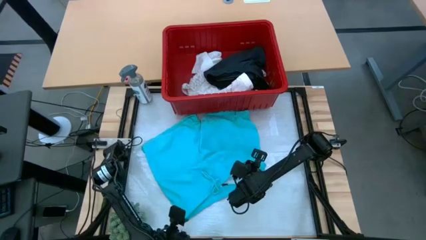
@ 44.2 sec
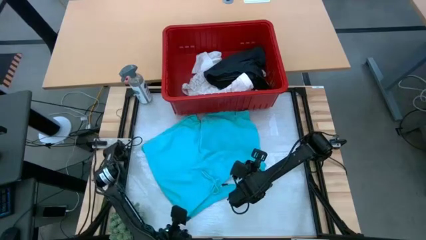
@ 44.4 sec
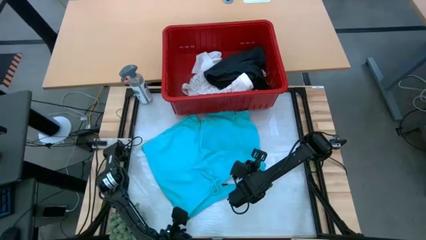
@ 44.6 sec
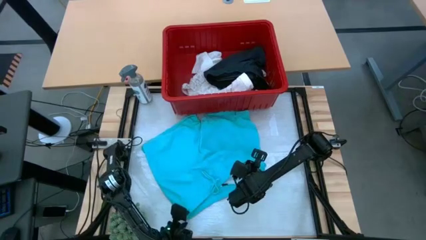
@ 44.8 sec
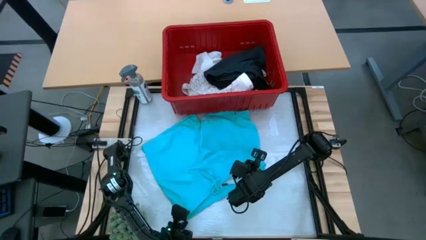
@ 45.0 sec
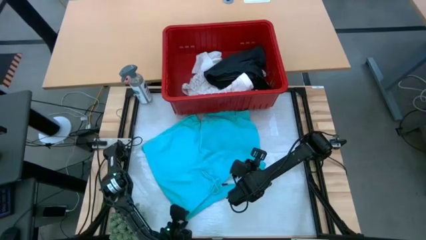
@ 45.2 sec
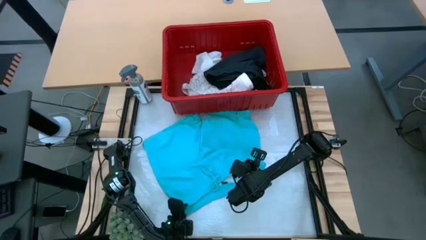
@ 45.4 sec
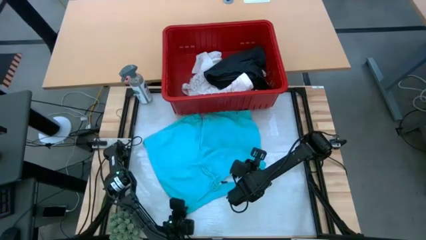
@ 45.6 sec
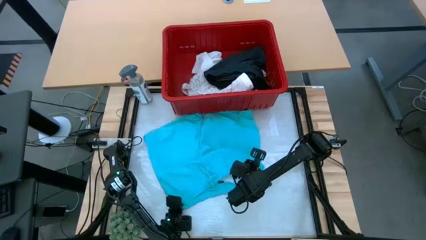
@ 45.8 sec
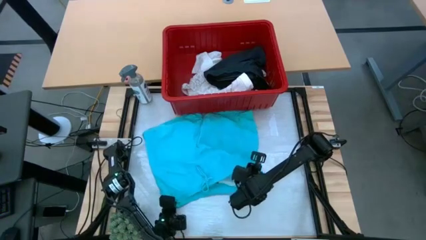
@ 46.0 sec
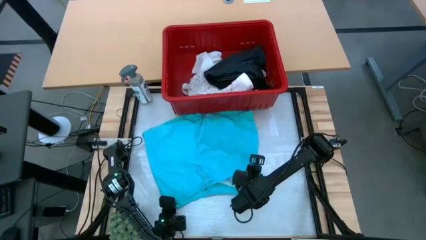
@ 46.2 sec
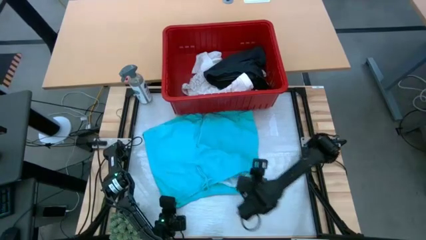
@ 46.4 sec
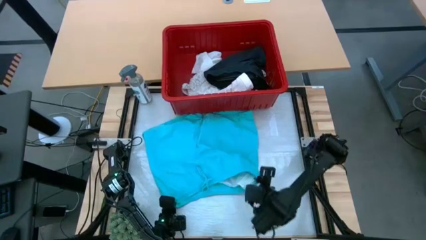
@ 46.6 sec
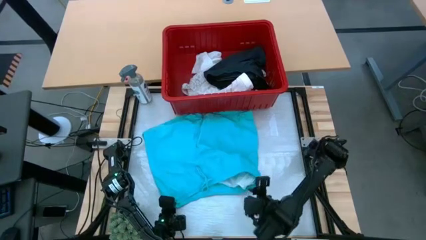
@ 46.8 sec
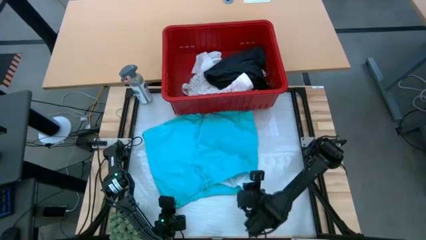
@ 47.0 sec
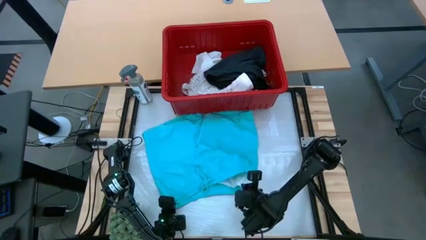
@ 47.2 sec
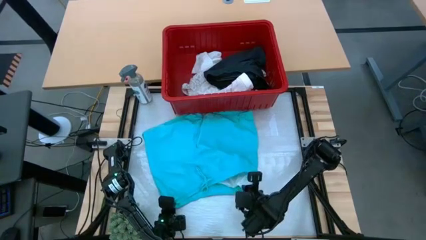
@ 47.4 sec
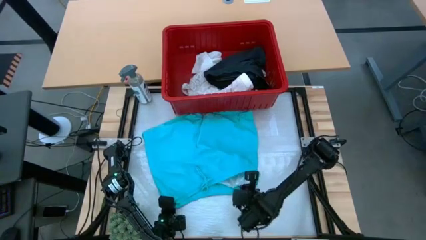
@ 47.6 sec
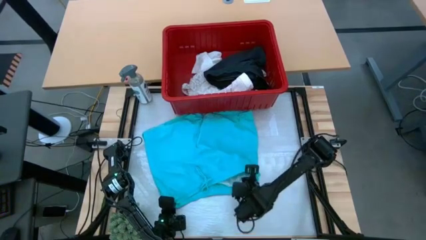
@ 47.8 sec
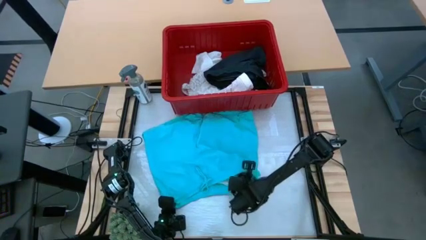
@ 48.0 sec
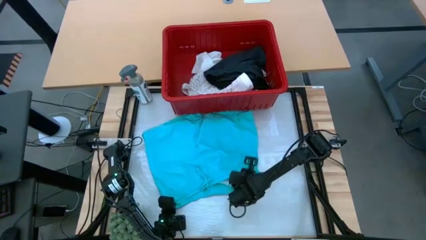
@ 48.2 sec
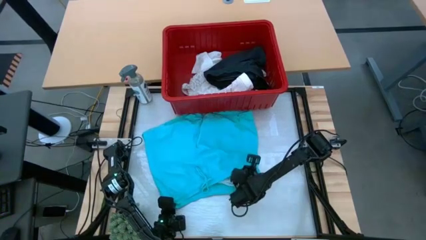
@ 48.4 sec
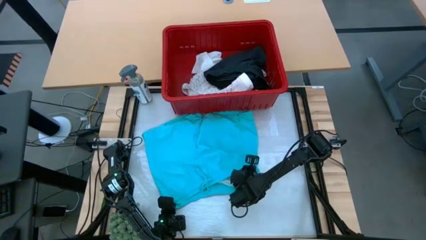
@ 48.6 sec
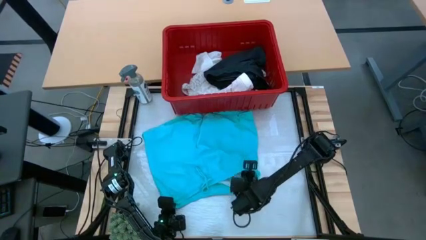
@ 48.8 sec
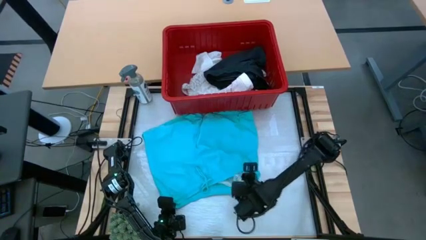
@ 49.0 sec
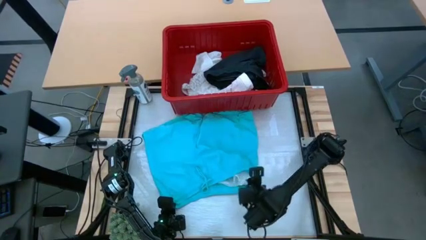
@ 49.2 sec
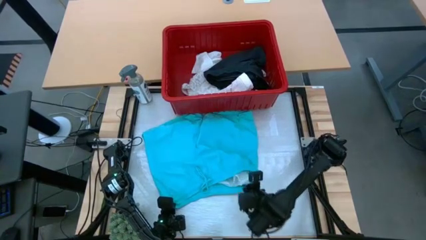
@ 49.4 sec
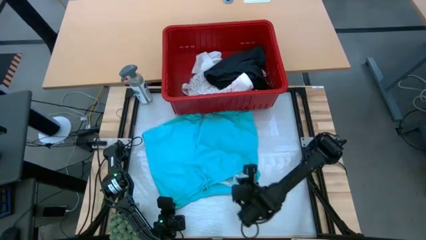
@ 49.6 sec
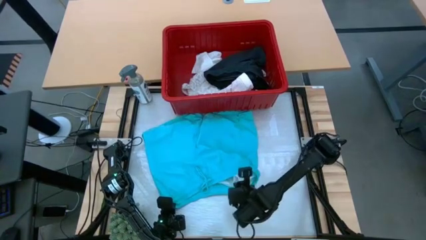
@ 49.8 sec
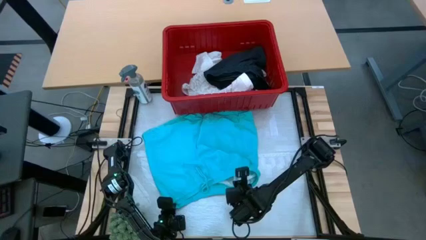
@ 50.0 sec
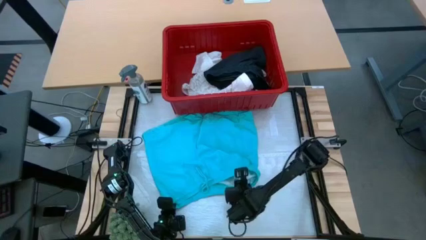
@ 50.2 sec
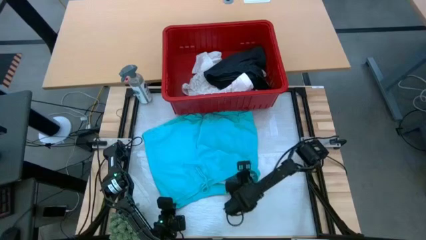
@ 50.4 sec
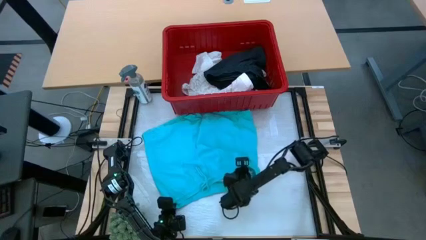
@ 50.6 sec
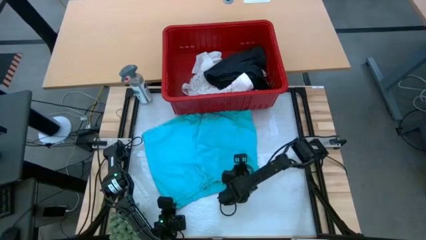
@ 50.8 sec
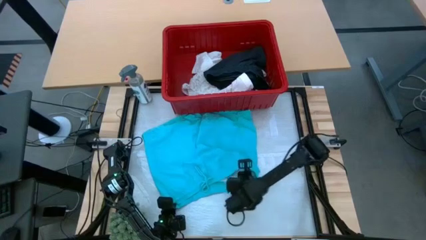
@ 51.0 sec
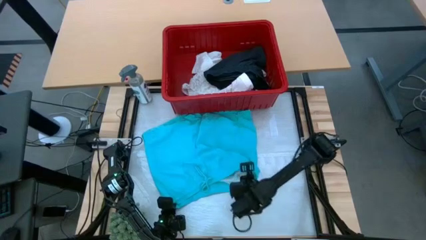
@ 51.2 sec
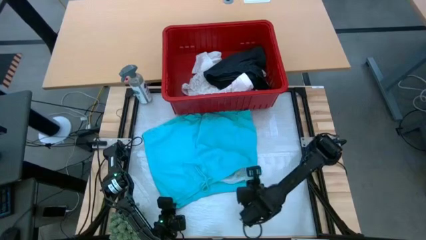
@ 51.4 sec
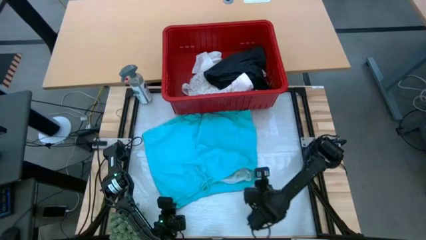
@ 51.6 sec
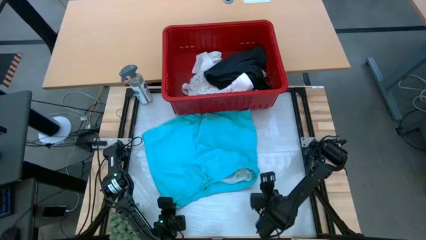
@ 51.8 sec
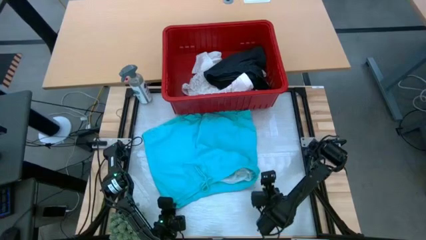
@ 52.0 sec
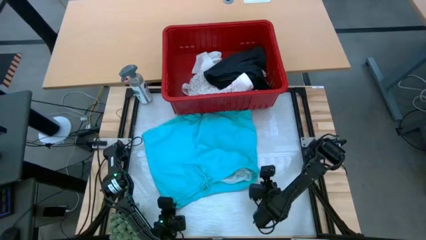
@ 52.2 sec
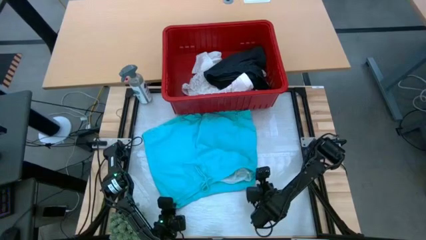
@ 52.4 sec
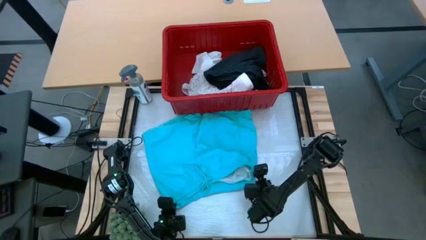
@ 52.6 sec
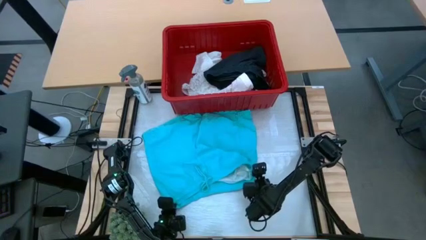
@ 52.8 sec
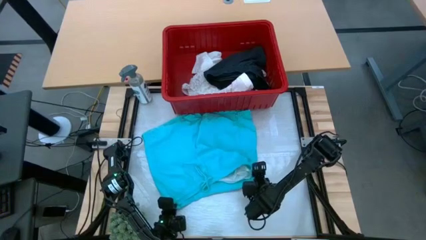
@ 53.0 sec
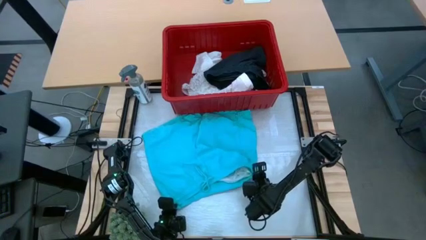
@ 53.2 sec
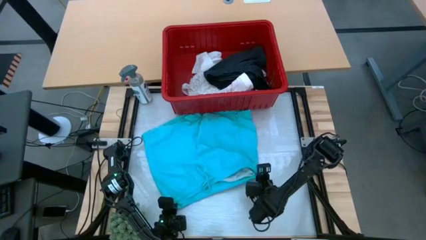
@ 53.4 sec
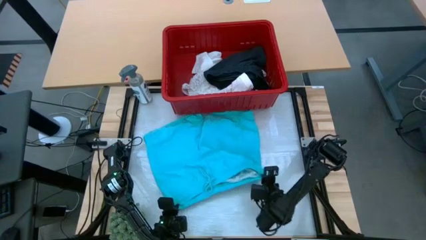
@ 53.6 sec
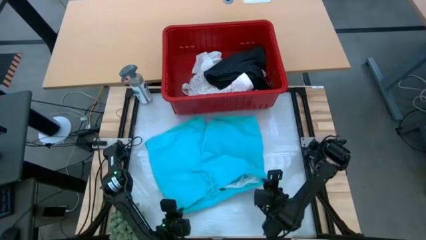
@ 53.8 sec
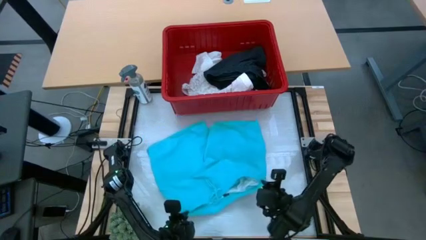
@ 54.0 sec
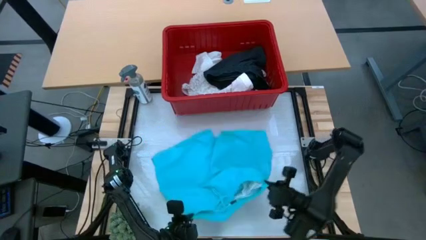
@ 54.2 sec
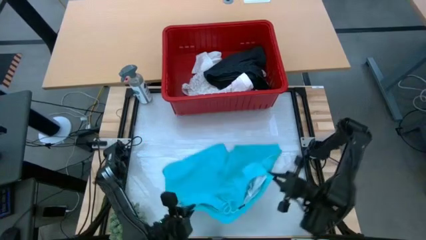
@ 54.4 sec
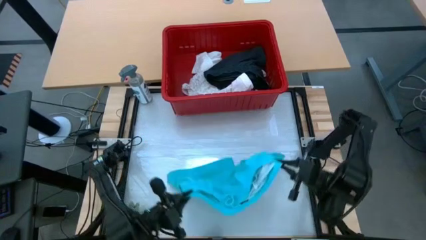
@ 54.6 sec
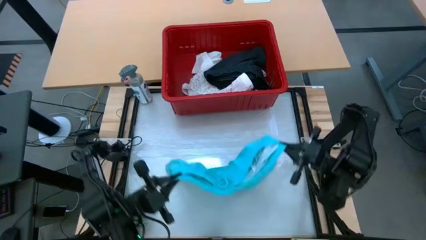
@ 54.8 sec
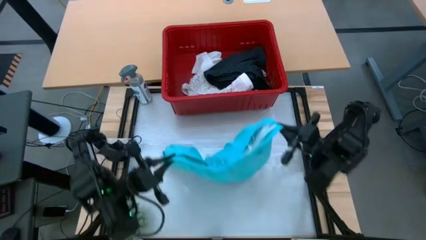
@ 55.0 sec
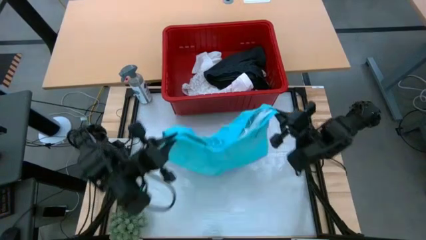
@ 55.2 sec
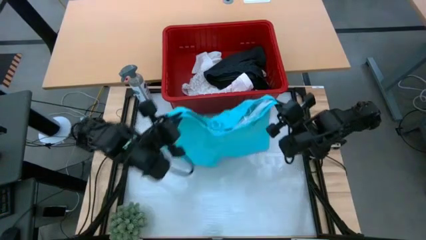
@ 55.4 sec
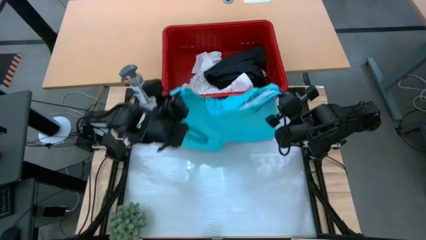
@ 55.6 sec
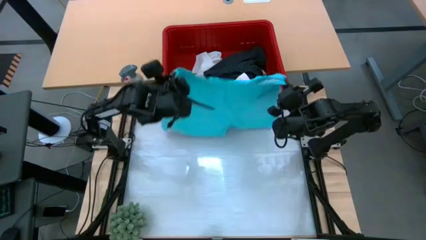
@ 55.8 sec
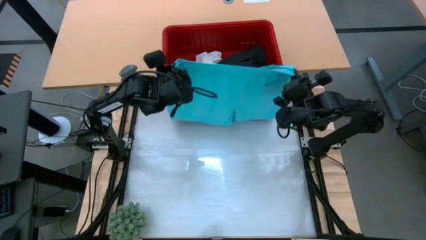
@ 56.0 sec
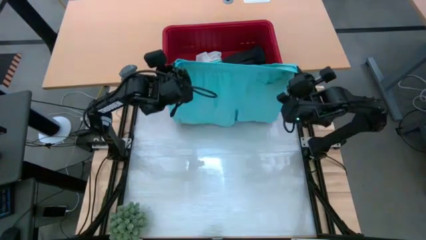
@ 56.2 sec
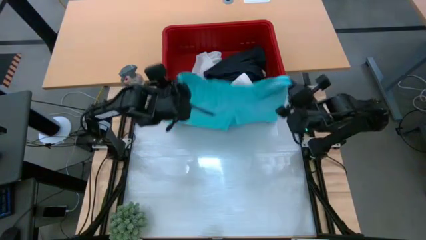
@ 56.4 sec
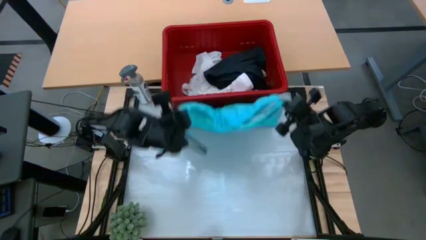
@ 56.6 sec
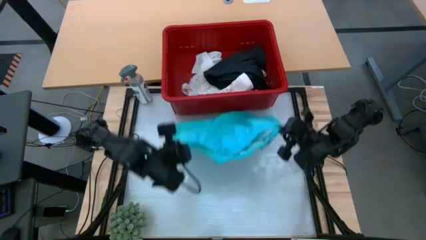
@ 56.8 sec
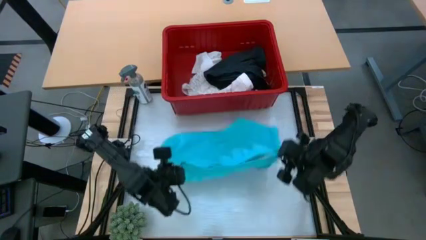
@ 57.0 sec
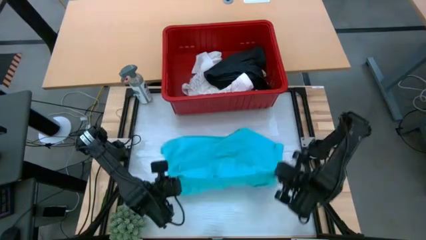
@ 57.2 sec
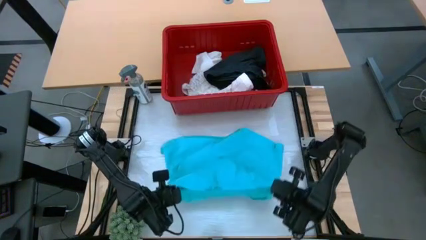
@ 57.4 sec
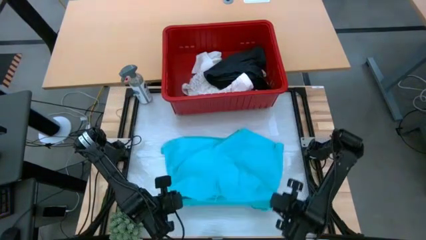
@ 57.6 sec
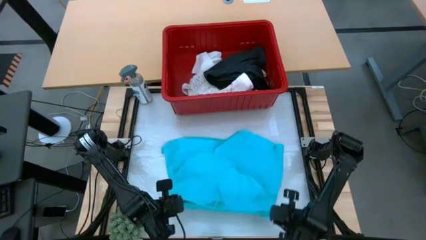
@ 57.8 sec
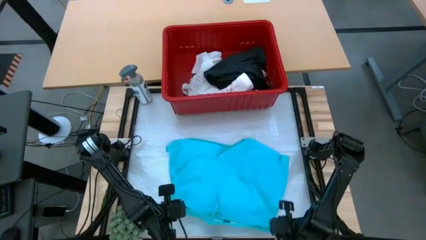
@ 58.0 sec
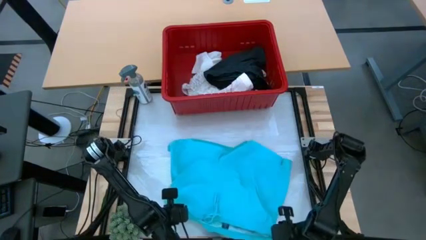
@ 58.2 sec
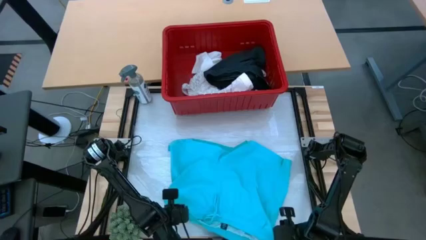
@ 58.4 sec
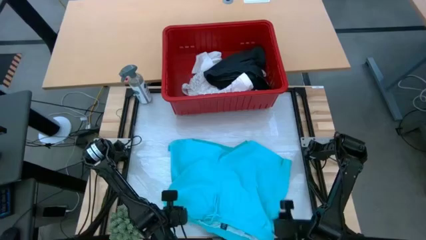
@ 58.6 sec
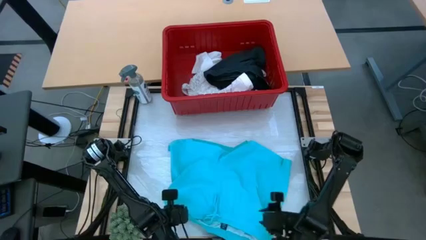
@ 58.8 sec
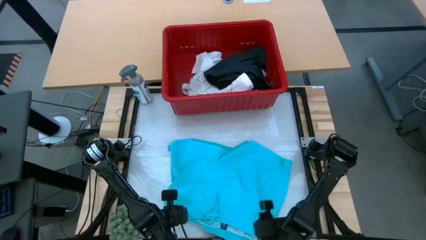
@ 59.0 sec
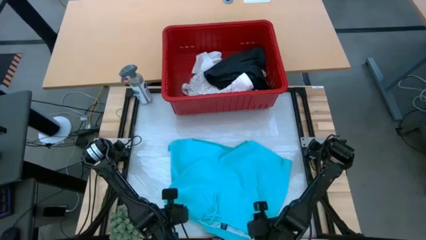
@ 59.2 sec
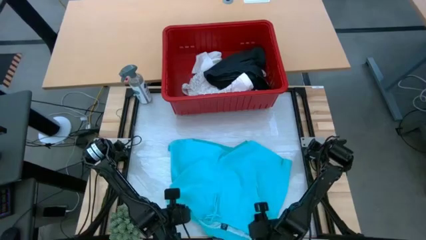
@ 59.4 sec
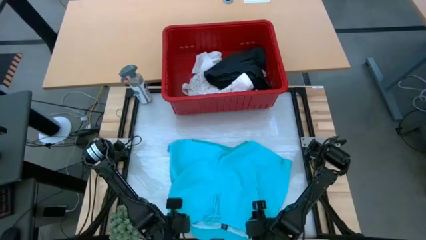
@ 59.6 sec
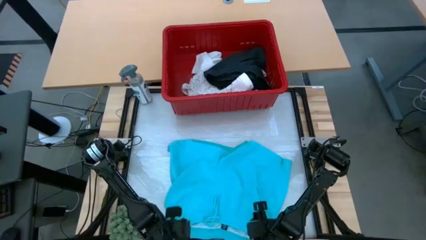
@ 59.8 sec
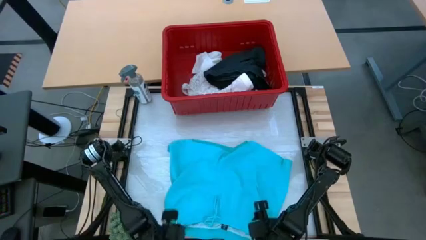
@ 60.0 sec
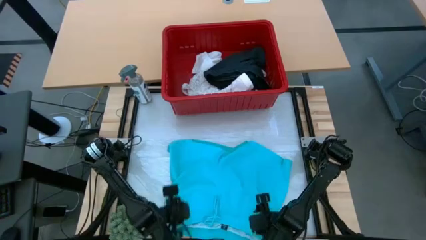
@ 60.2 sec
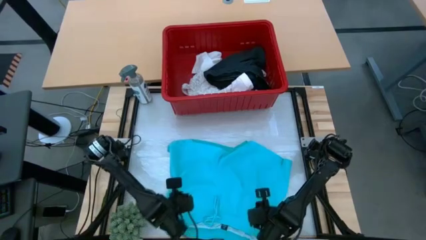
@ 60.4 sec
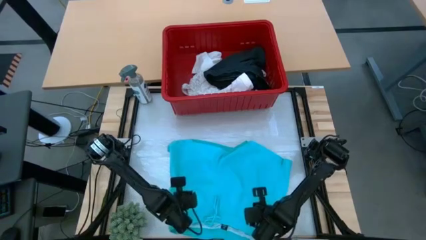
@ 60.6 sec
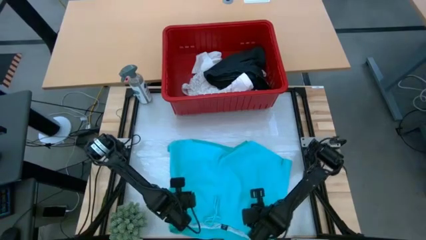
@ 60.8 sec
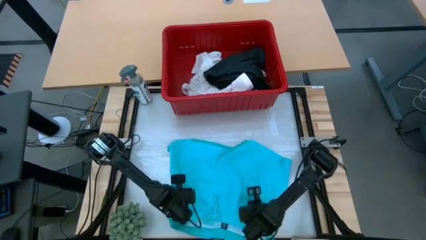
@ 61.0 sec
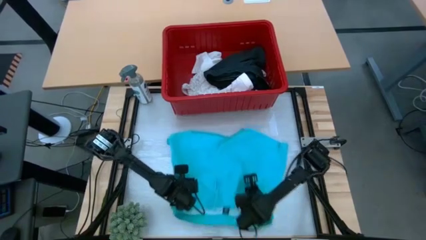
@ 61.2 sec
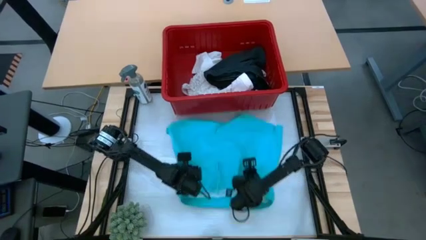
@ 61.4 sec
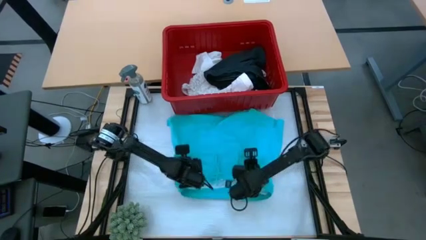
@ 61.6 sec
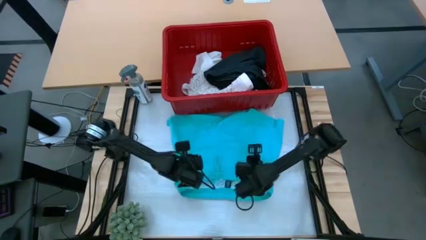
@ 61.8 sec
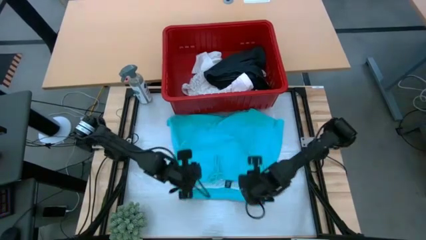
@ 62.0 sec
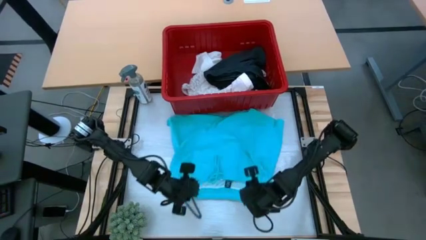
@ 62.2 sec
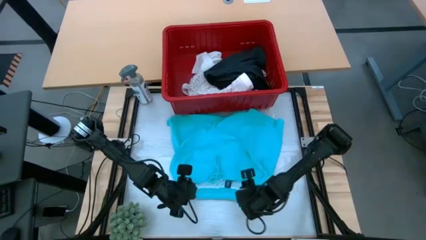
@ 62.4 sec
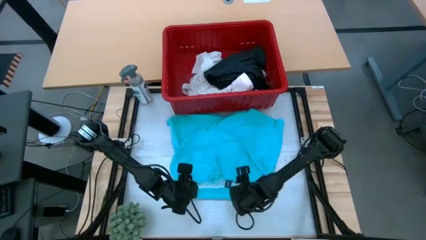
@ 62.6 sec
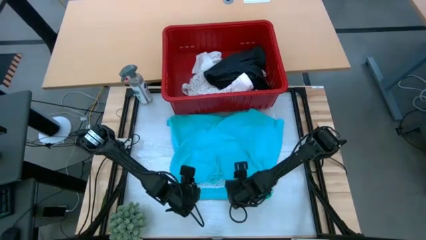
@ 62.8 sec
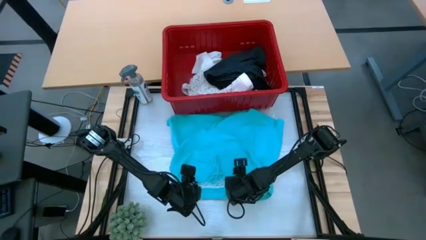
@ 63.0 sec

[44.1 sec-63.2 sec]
Task: Fold laundry
Fold the light blue shorts
